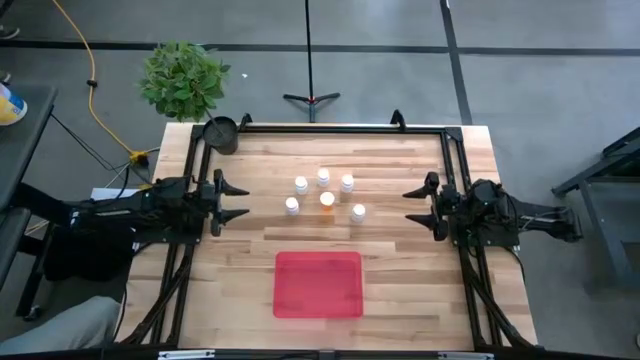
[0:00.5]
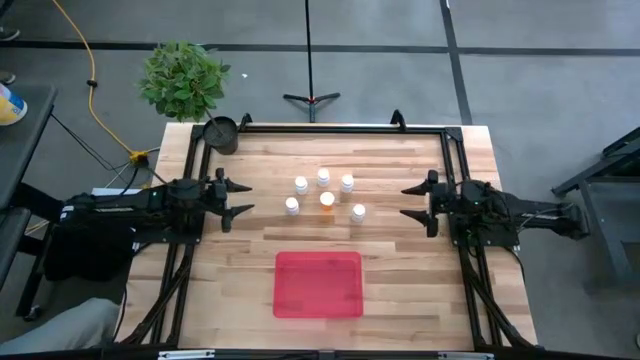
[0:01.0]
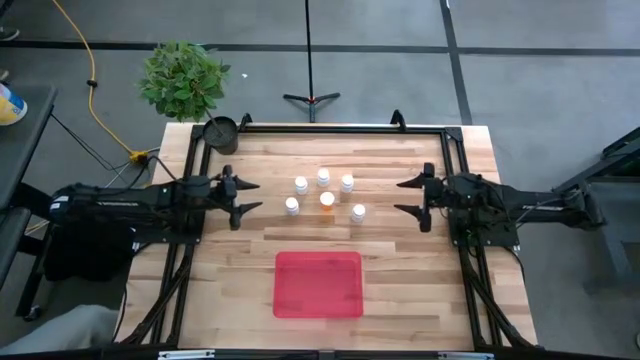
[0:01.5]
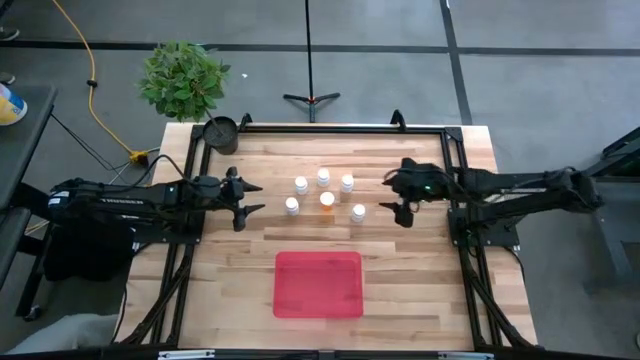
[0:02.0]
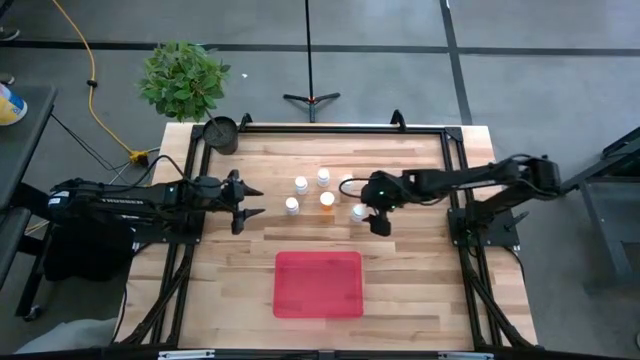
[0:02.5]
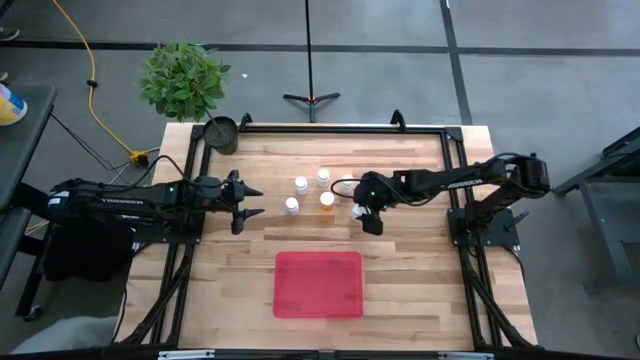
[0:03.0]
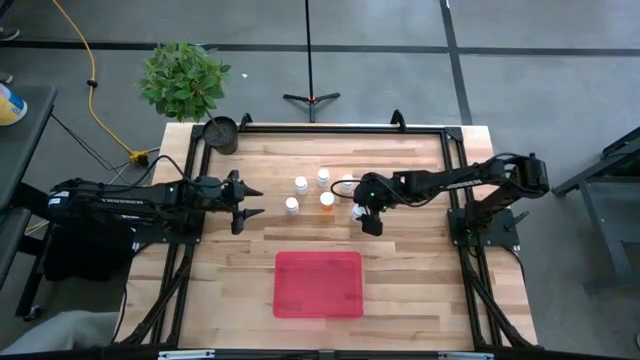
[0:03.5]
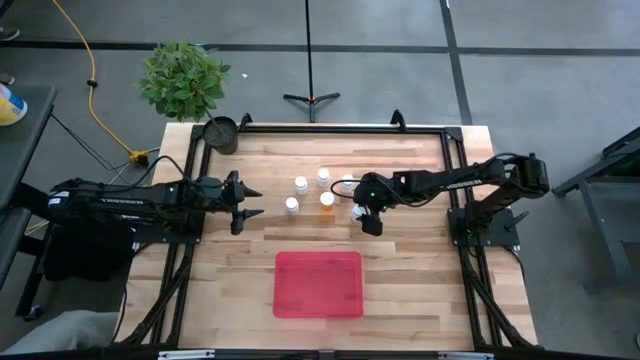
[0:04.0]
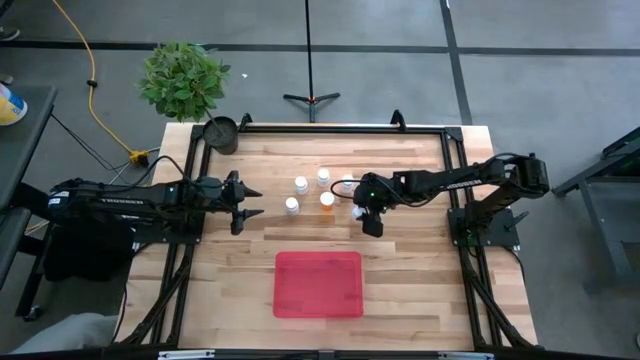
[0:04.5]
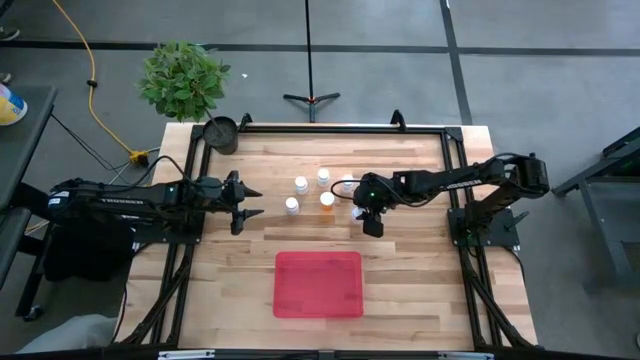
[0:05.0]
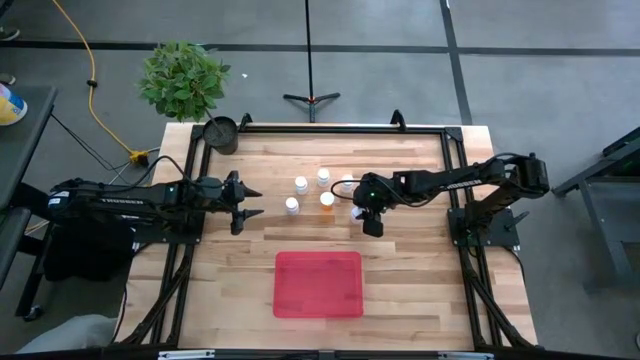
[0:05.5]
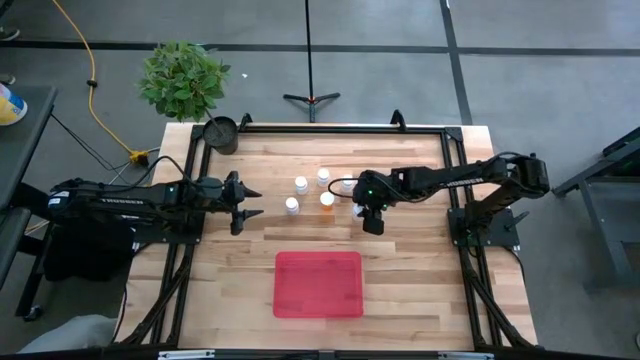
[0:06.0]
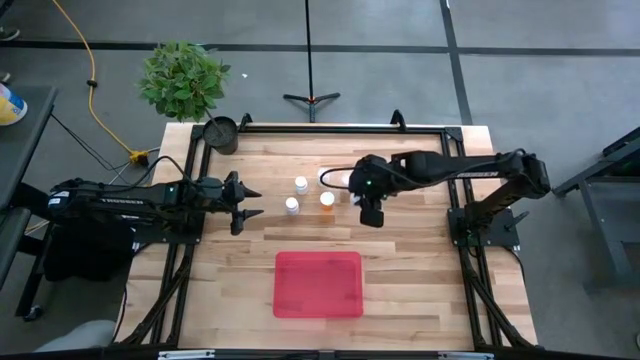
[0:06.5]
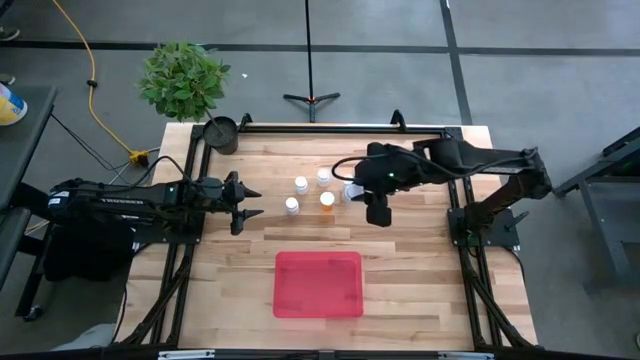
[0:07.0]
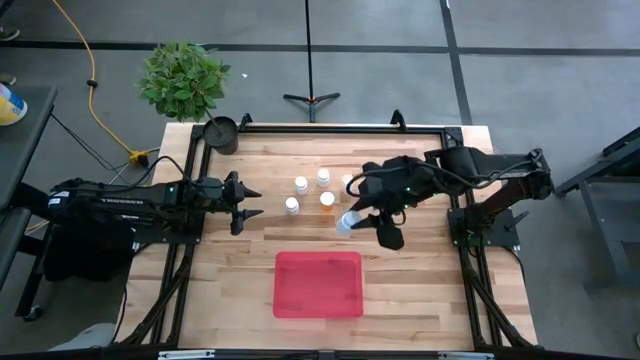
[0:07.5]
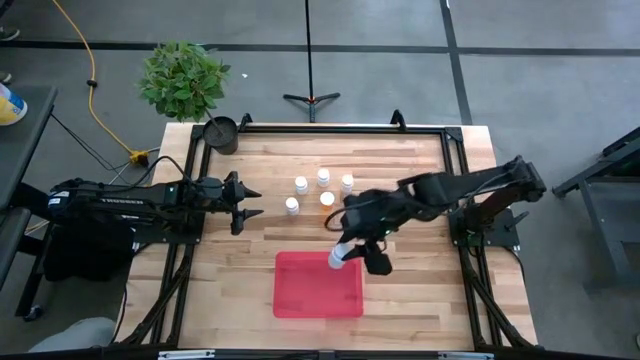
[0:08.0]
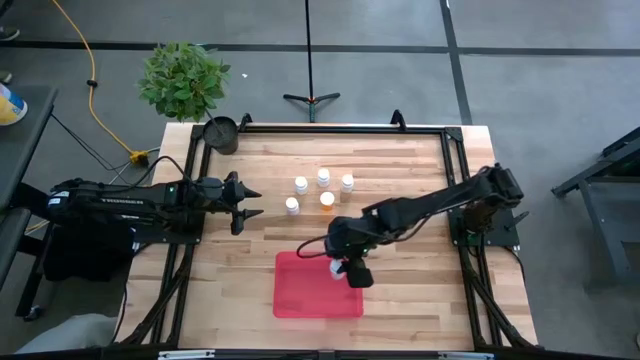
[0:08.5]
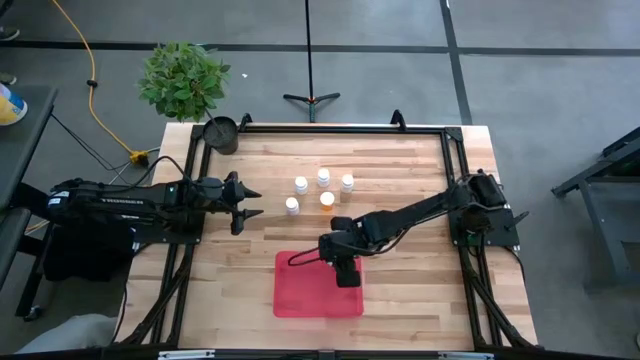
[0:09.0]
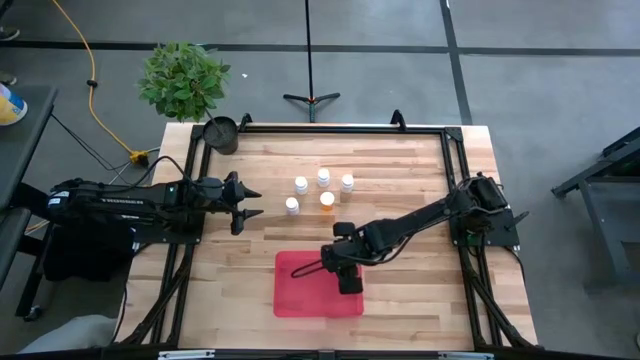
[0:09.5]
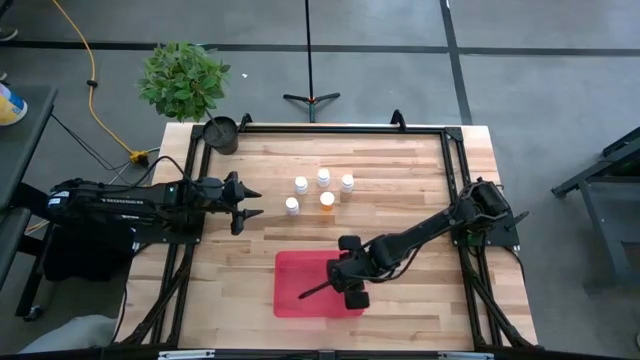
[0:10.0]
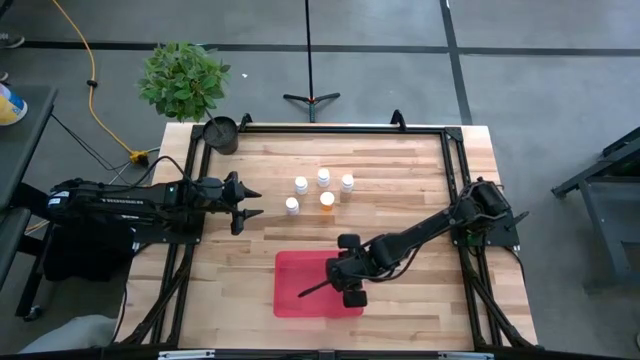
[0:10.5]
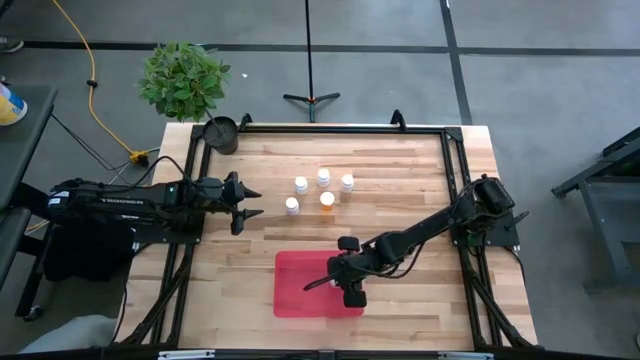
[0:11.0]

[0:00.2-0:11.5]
Task: Pick and place pill bottles into a basket
Put the white medicine bottle into the red bin

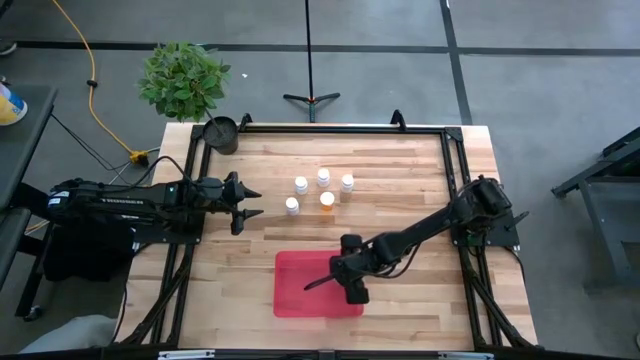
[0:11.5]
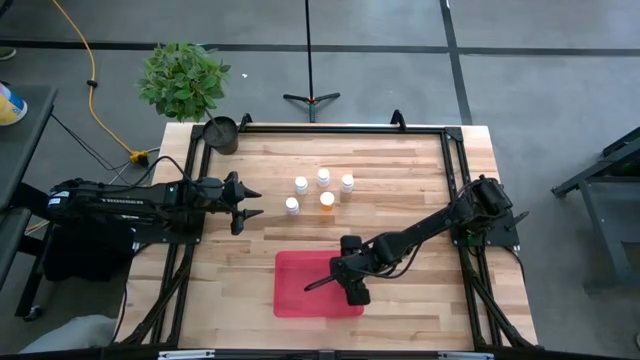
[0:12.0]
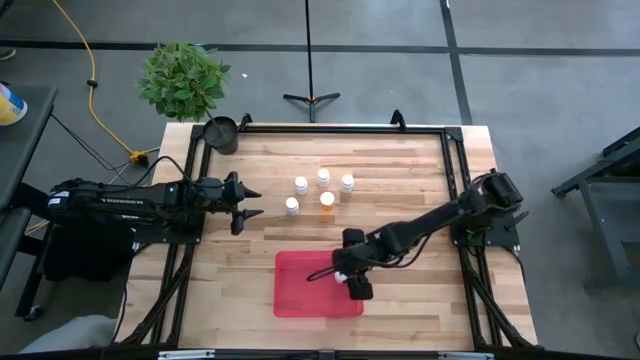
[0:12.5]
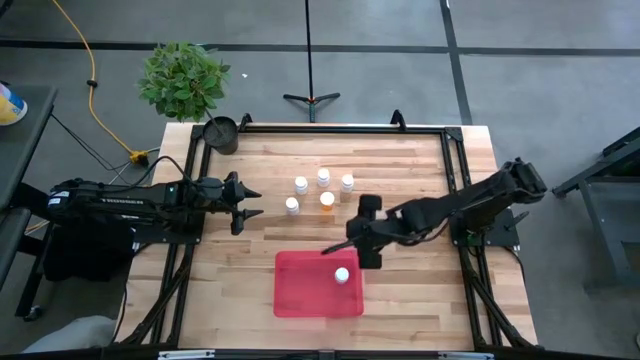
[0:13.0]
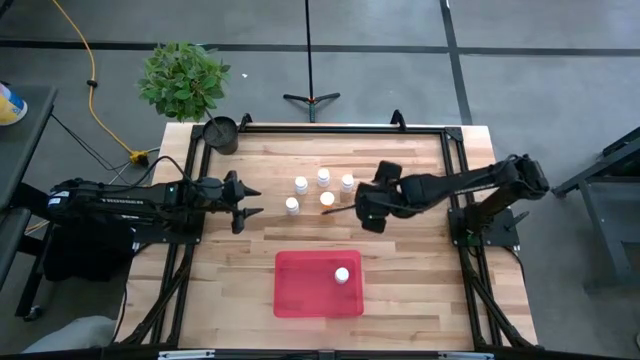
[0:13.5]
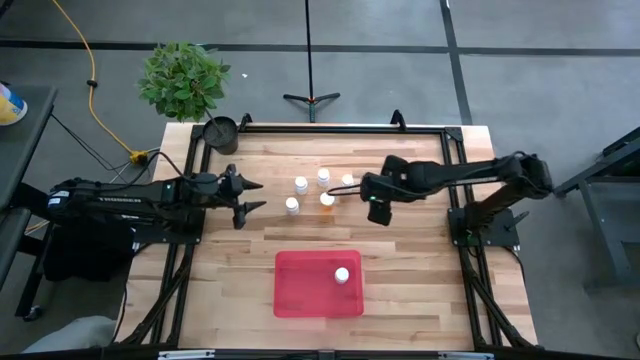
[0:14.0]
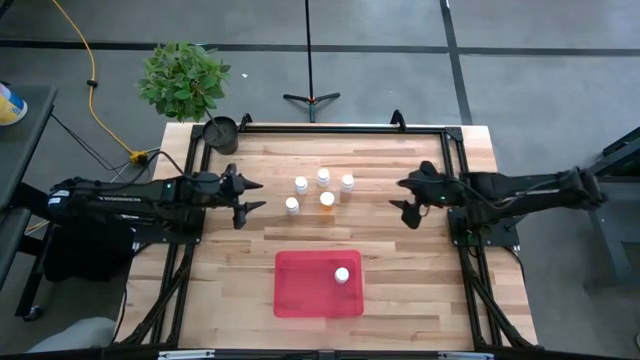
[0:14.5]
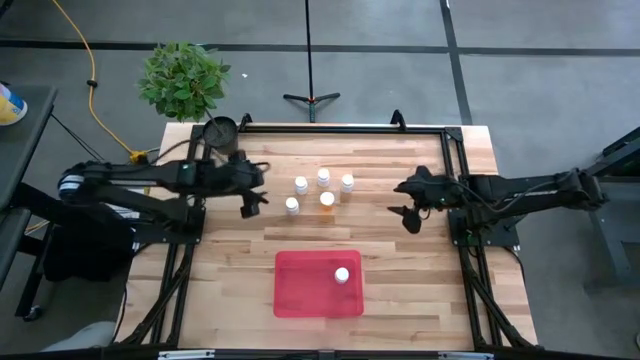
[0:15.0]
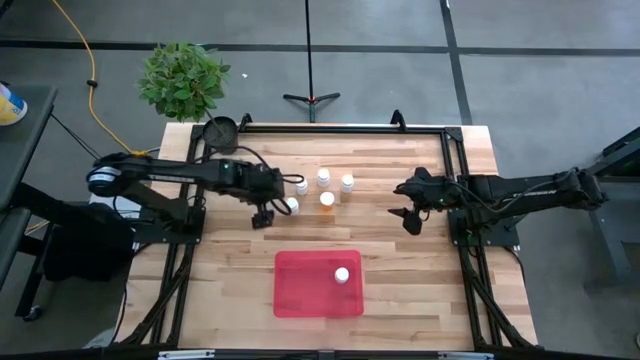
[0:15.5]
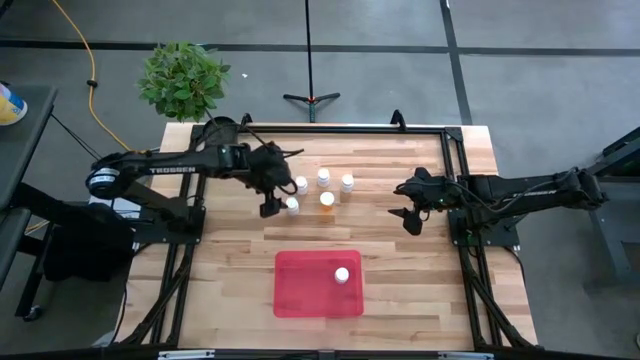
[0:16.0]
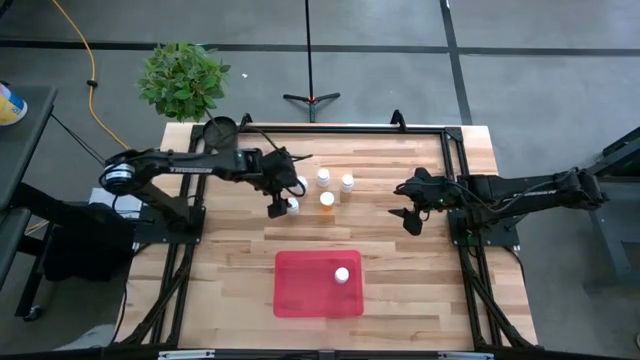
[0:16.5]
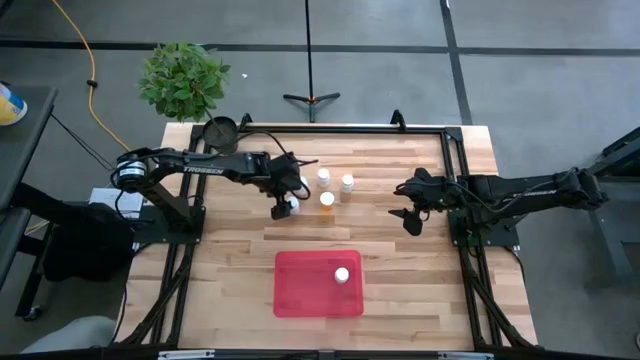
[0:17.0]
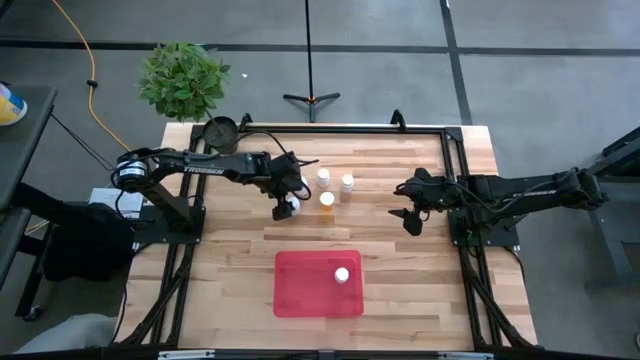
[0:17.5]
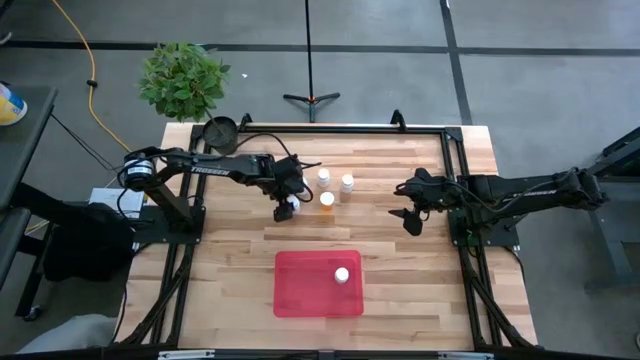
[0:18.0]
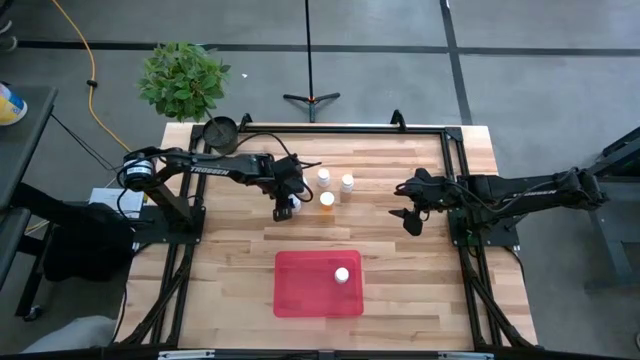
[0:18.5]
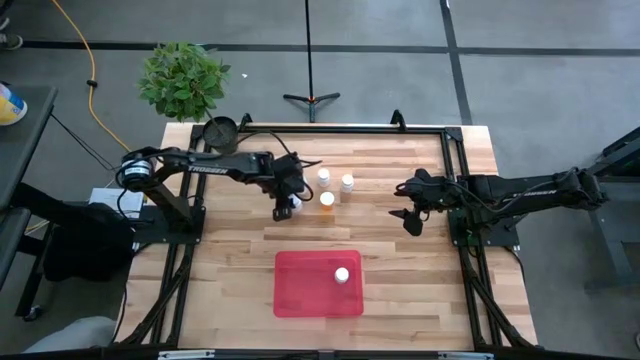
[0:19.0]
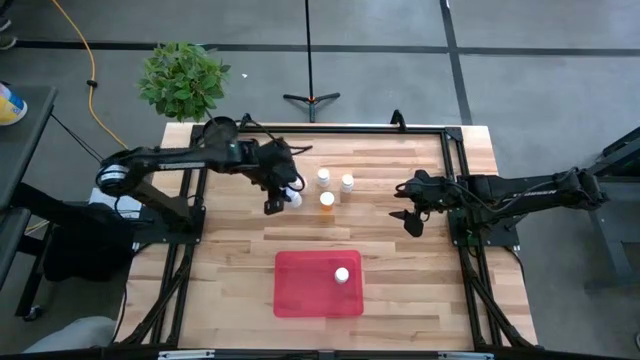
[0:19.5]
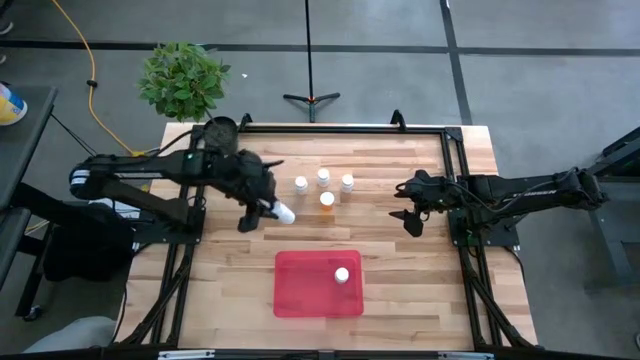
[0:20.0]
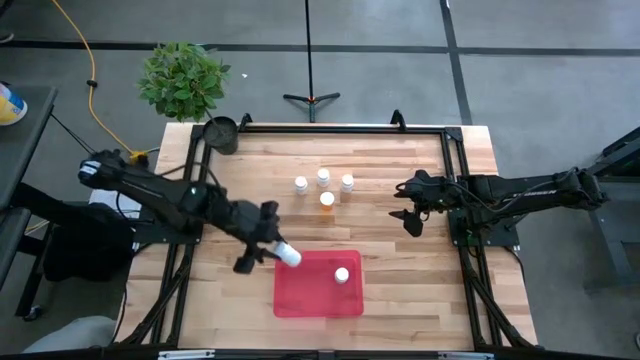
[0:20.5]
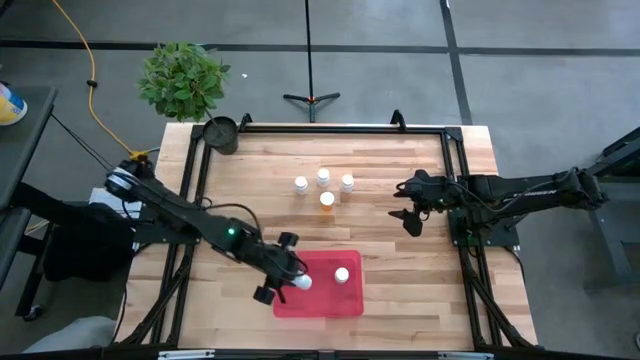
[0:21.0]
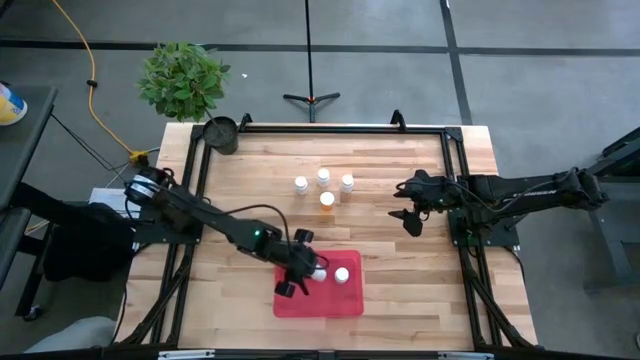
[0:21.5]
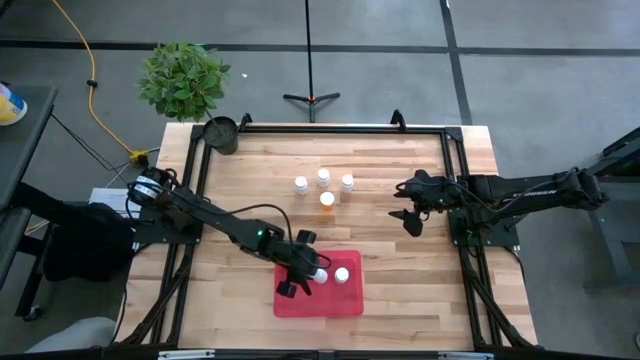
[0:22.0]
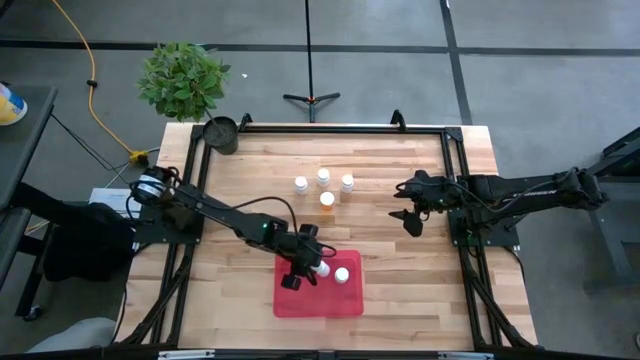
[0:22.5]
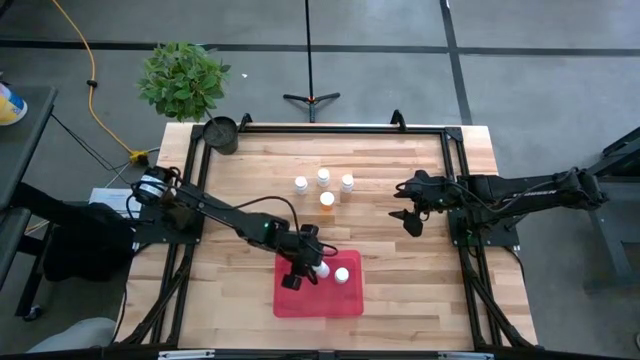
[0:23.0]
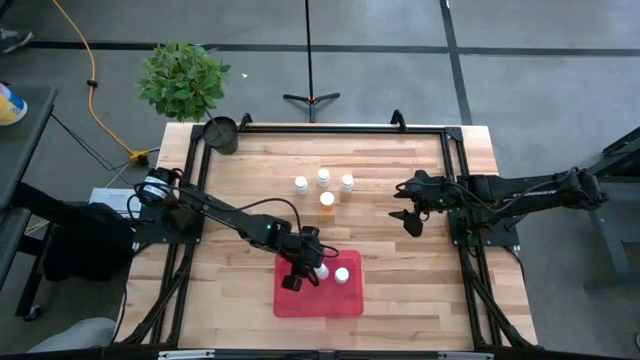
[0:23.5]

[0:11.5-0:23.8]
Put the white medicine bottle into the red bin
